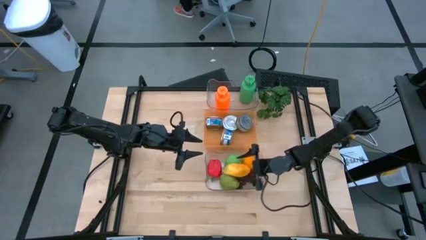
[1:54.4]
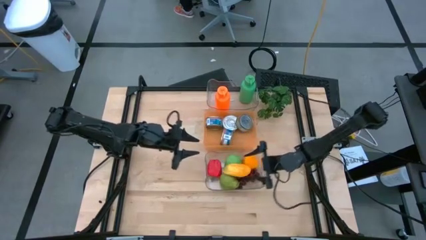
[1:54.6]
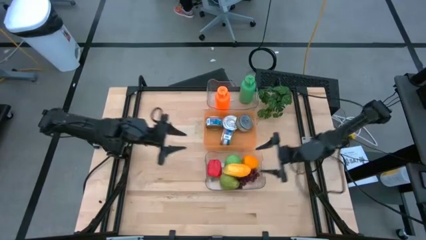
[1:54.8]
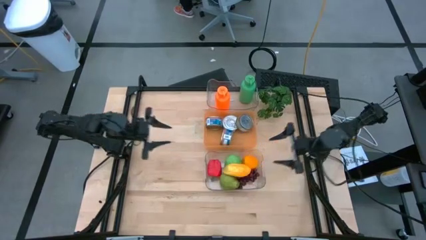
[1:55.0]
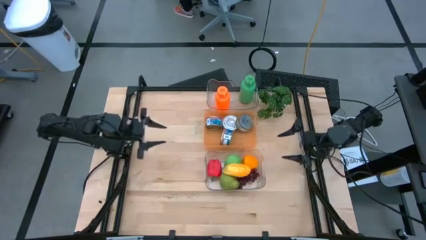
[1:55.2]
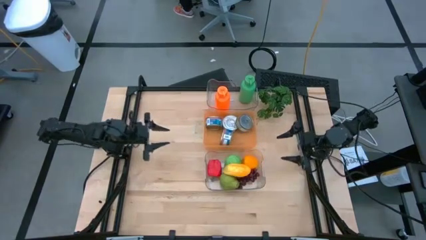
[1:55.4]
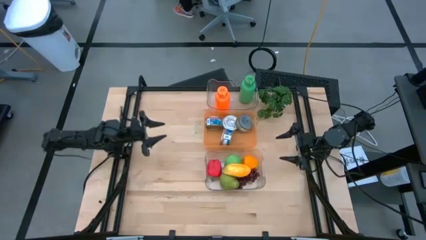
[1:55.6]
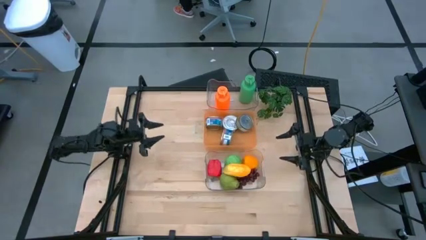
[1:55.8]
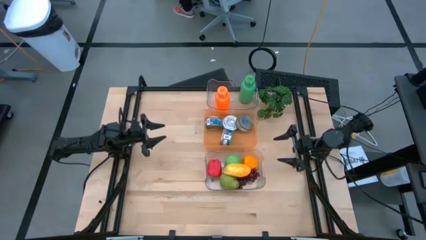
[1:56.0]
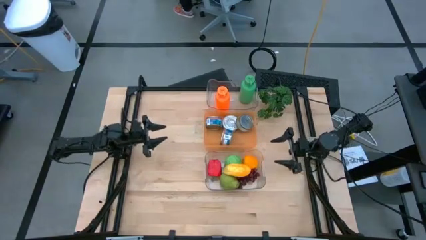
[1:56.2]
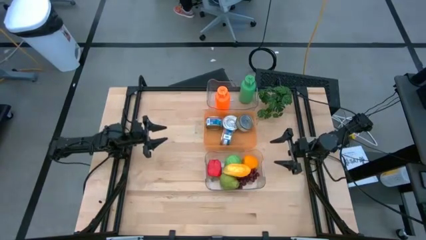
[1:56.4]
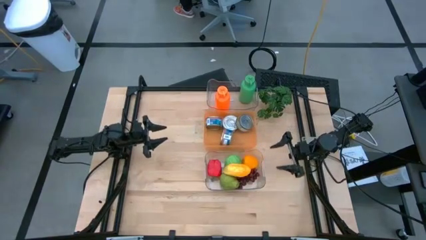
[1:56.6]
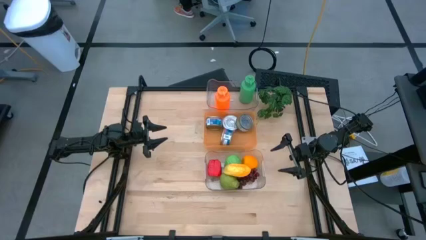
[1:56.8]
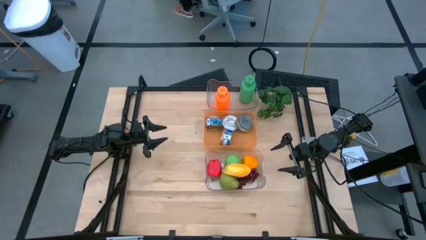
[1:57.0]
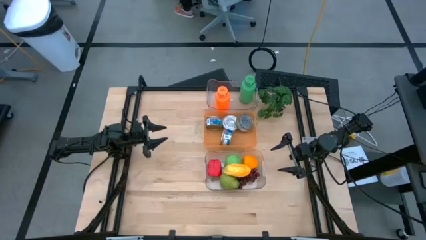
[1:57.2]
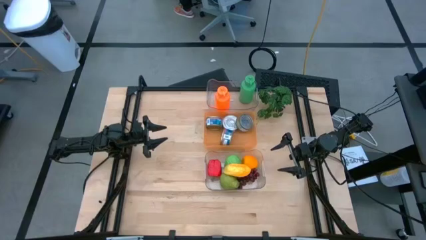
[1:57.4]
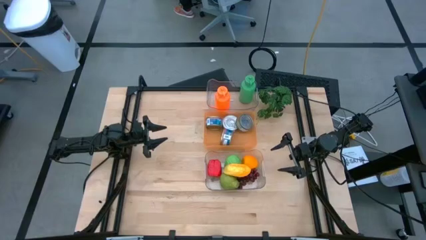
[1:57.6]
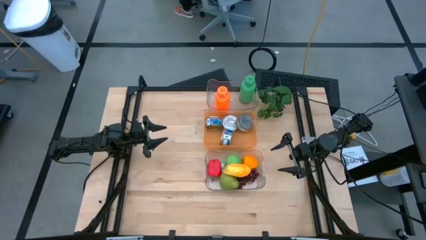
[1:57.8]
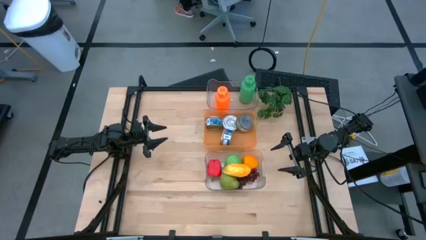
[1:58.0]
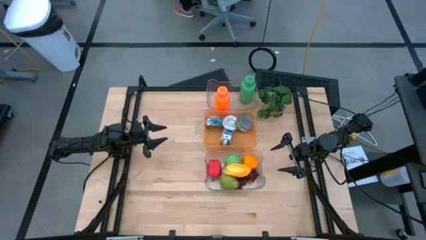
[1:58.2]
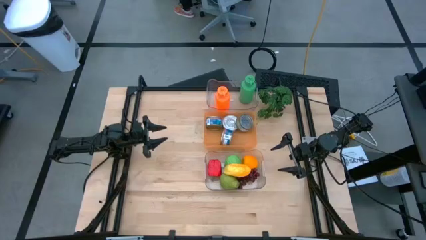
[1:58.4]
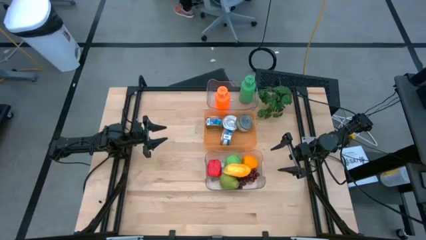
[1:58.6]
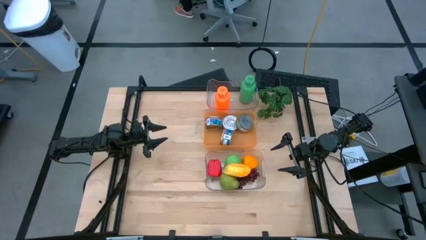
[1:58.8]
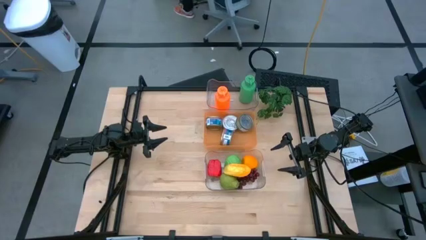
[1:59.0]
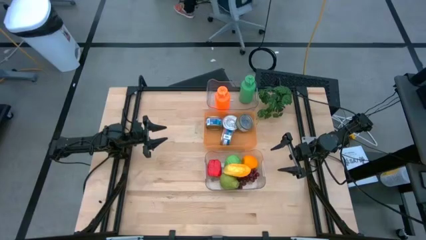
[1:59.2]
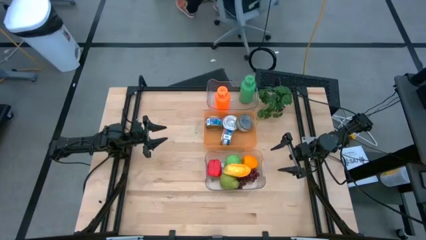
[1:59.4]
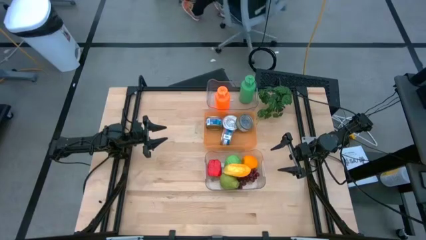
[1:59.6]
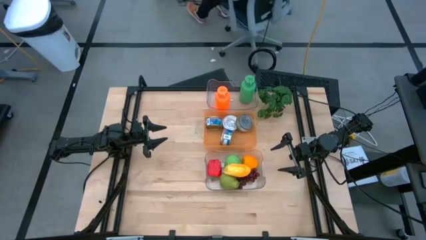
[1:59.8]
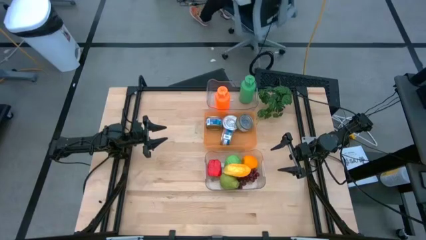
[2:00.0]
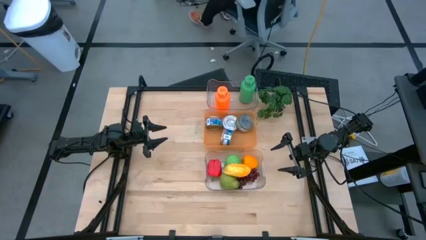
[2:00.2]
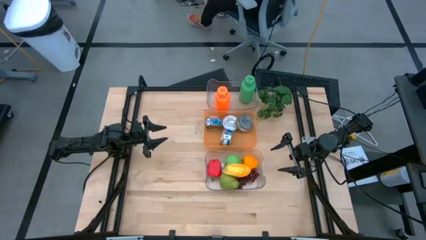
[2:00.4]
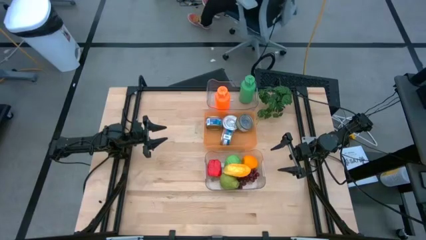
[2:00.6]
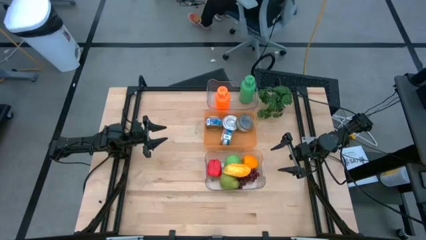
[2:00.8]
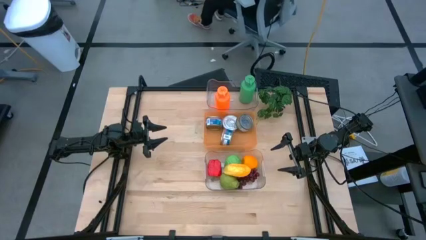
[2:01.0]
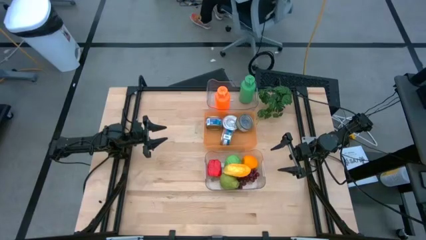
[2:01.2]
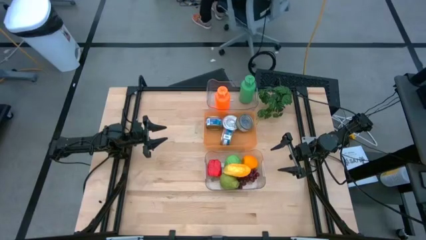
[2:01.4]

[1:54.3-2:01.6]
Task: Pick & Place Food Item
Return to Home Position

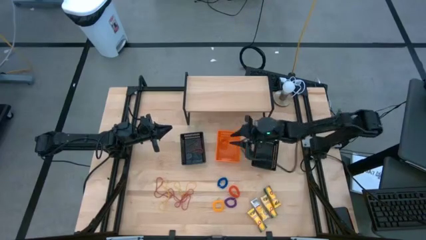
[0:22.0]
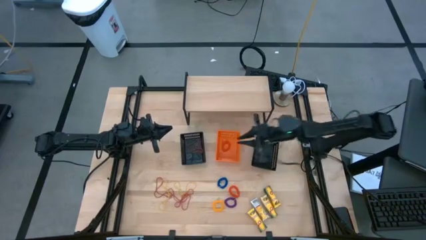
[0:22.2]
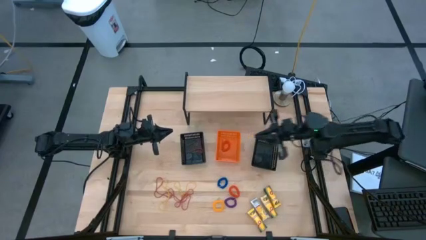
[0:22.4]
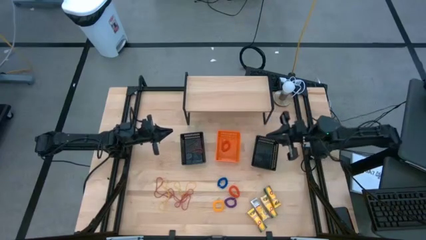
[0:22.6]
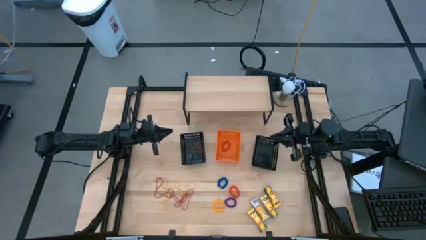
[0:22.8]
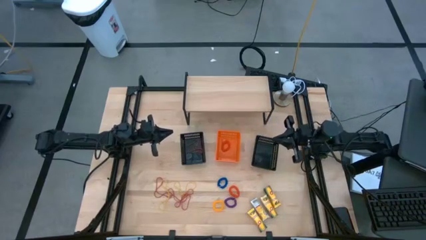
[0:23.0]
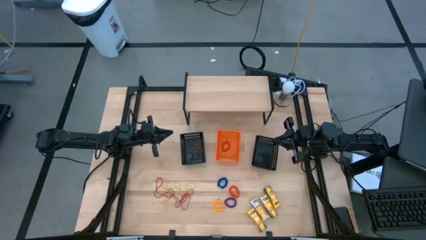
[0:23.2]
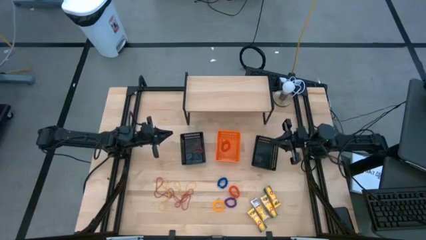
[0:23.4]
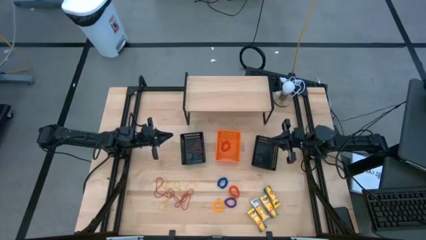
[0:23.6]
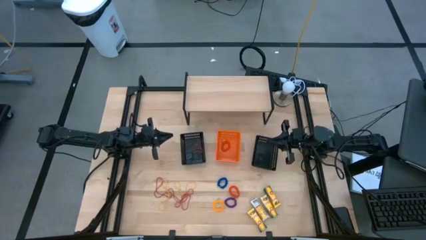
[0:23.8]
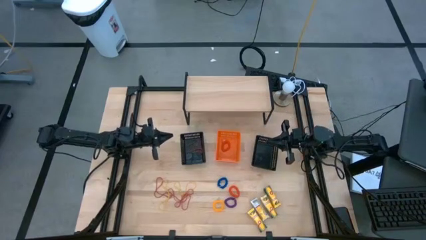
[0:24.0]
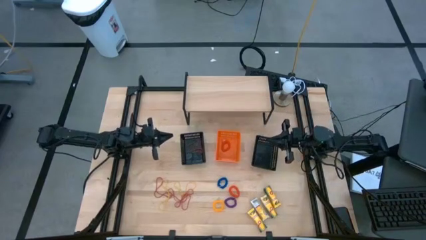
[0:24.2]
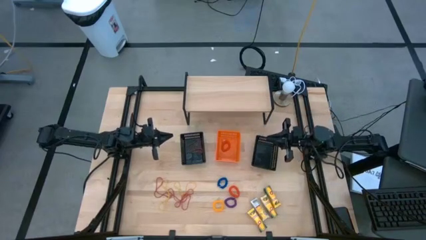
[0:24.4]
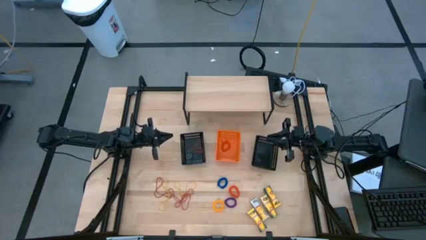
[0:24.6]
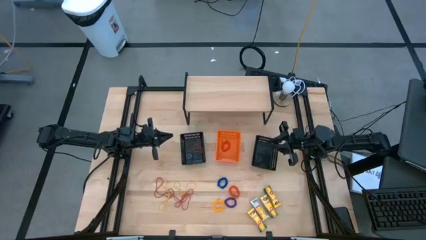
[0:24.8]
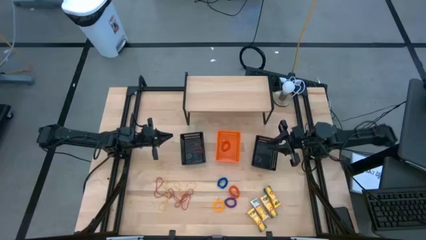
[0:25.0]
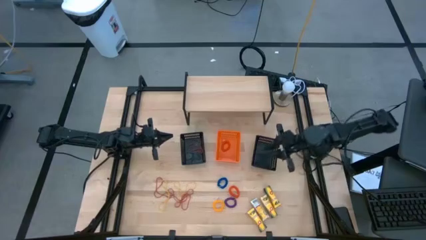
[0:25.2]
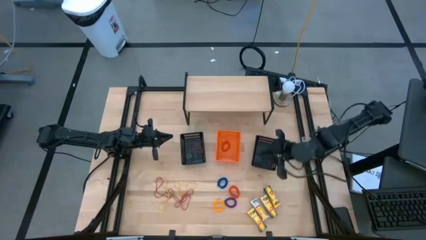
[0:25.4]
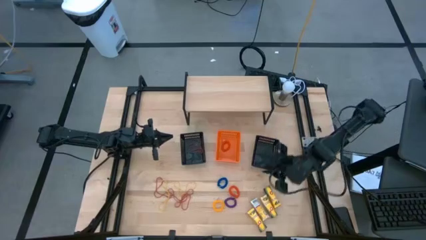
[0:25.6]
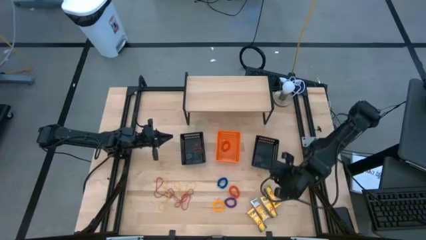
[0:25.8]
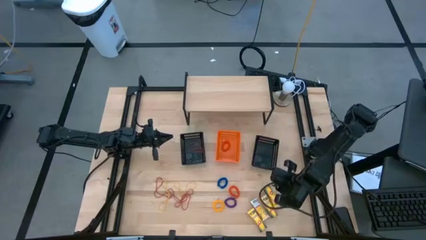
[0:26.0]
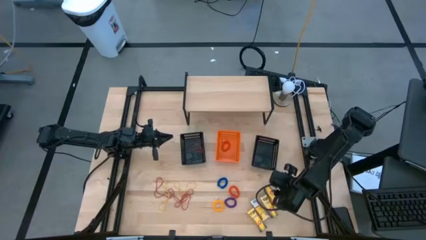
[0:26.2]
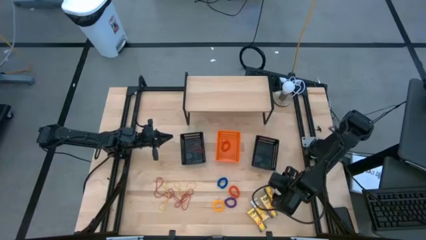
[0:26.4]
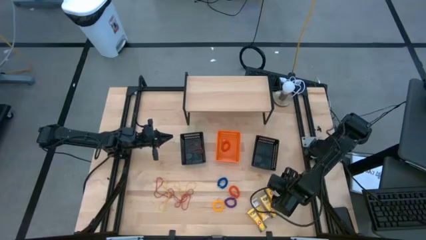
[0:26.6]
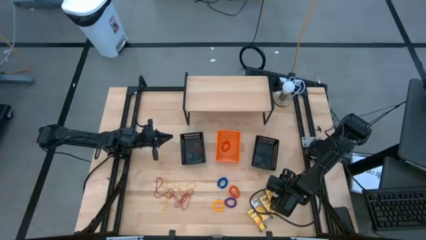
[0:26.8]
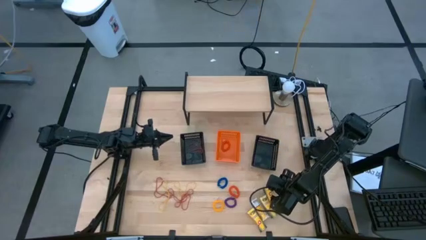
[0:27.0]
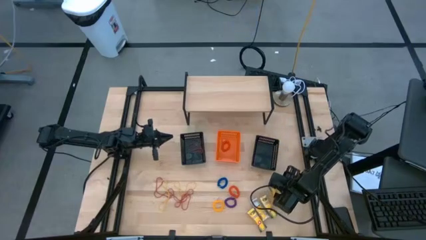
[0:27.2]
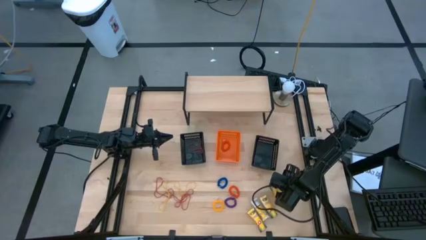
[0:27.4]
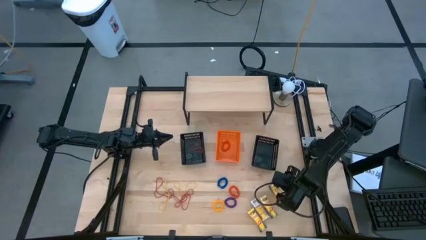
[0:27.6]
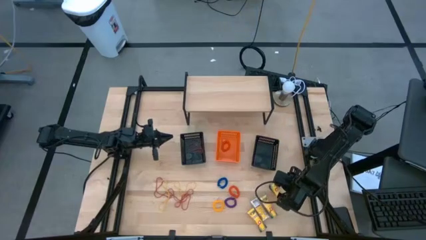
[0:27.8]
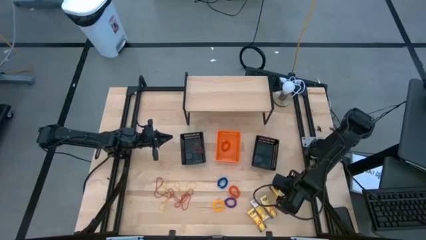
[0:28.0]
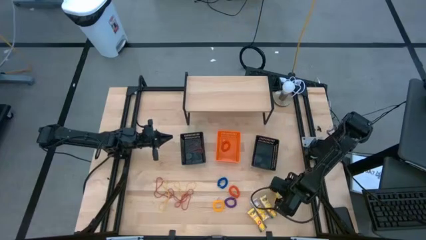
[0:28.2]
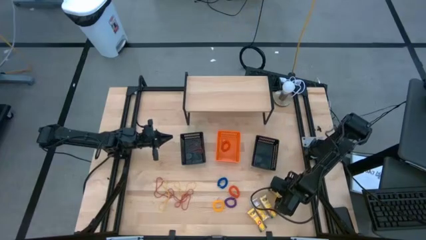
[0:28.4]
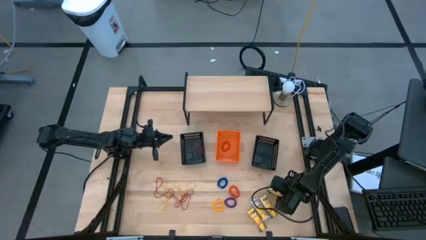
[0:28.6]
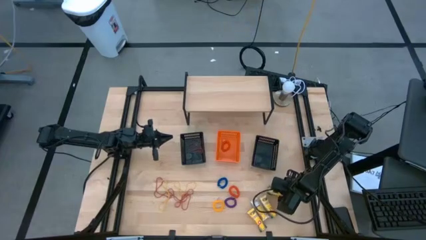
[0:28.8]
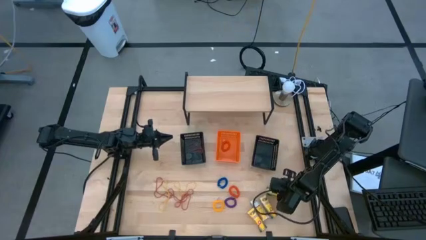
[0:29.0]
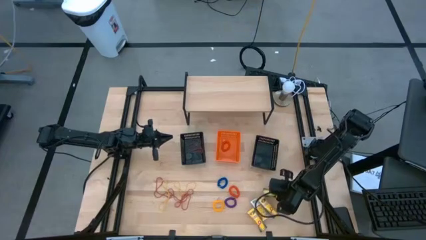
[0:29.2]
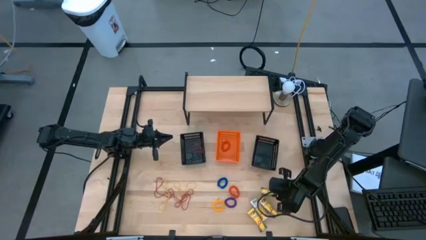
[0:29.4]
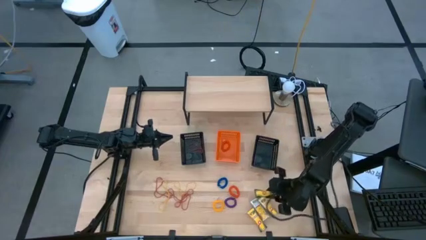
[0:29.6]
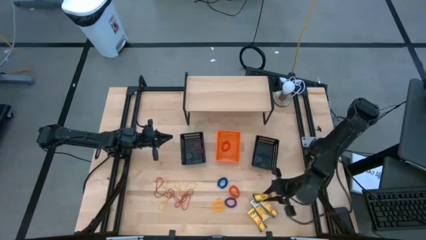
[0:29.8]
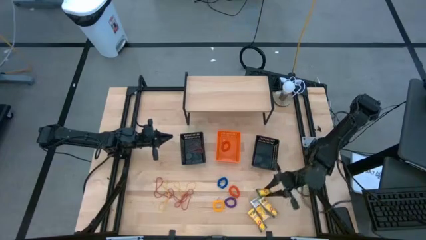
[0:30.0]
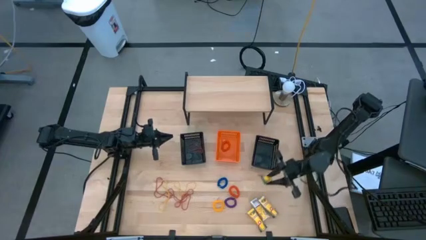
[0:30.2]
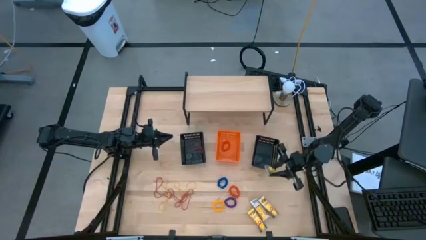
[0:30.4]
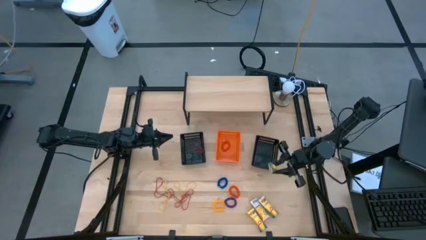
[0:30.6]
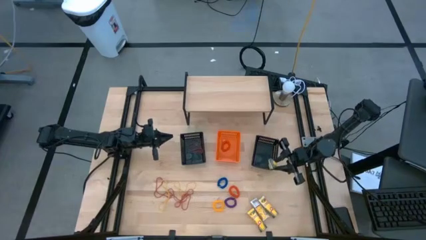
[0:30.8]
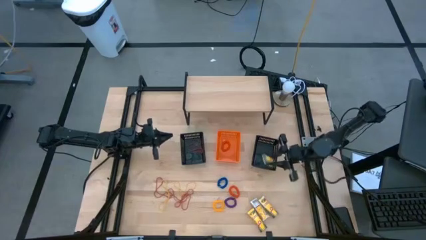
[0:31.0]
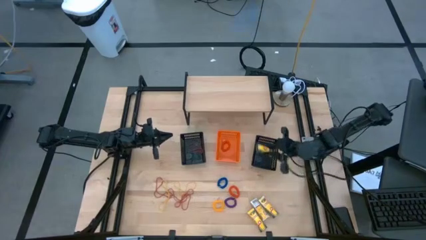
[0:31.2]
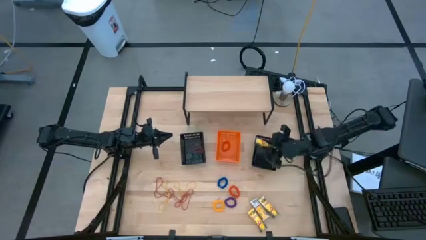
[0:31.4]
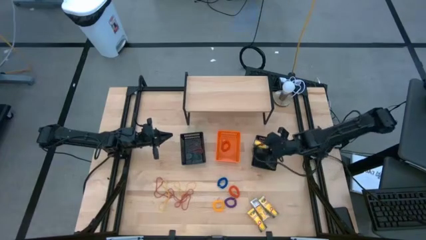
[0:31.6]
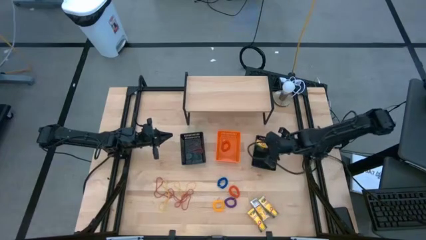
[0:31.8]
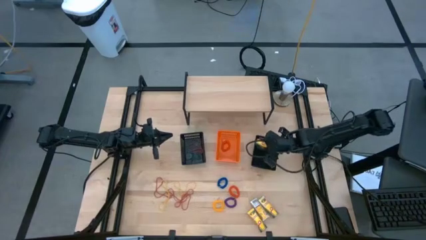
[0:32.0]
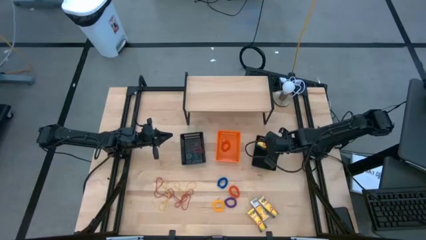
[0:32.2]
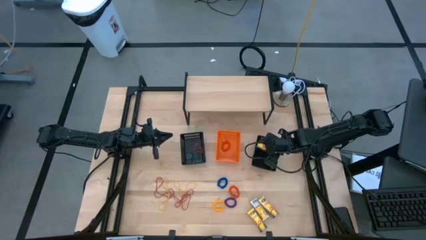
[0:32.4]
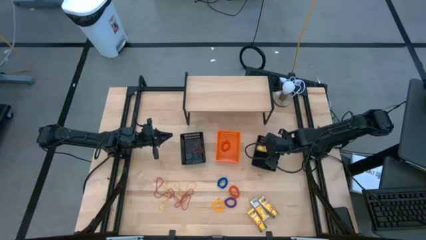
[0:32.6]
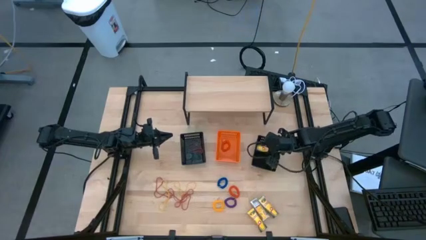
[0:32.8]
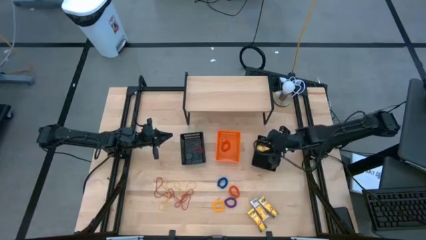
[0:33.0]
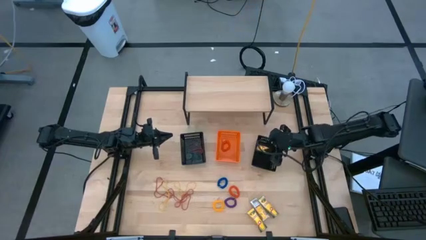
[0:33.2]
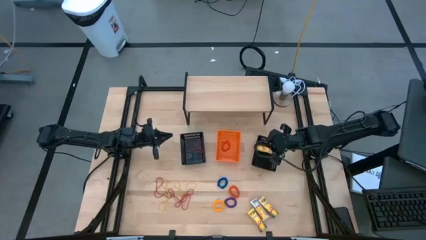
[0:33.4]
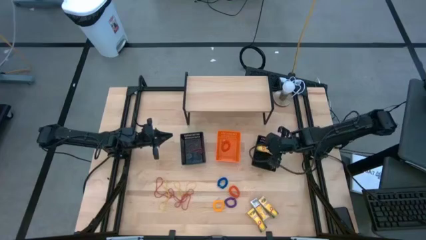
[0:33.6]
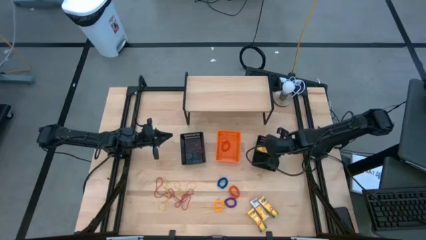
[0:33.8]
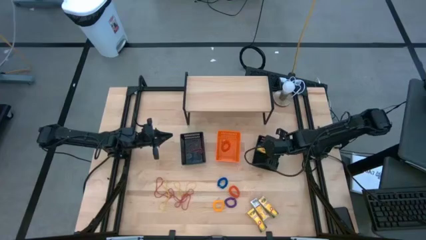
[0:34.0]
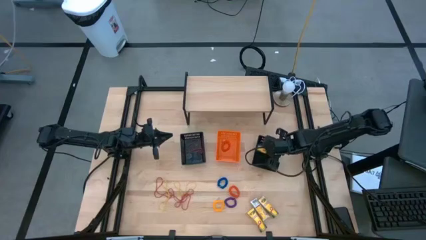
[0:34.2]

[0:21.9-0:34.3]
Task: Pick & Place Office Desk Supplies
Put the crayon box into the right black bin
